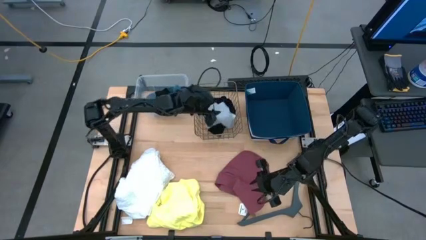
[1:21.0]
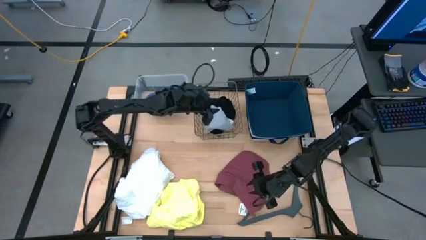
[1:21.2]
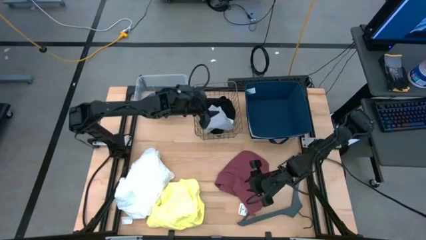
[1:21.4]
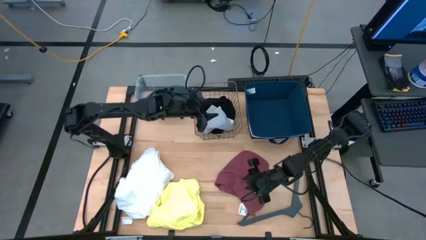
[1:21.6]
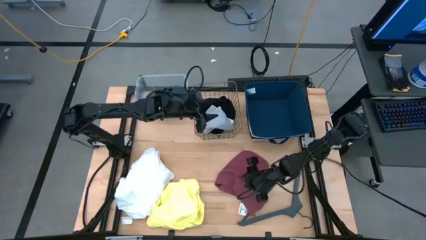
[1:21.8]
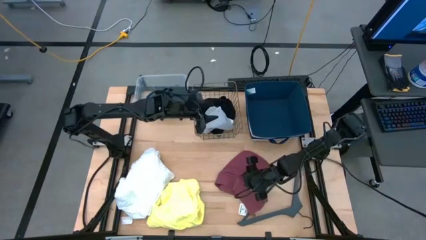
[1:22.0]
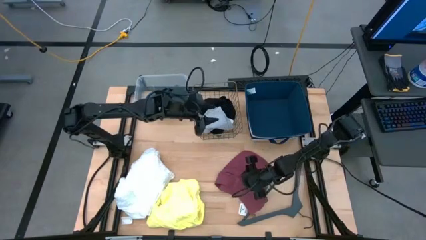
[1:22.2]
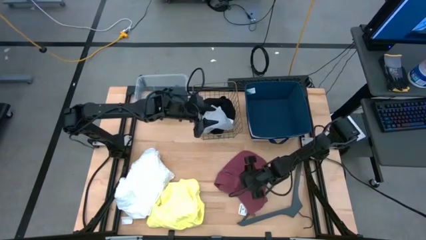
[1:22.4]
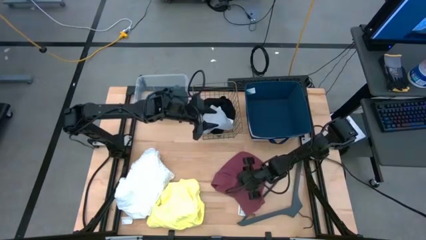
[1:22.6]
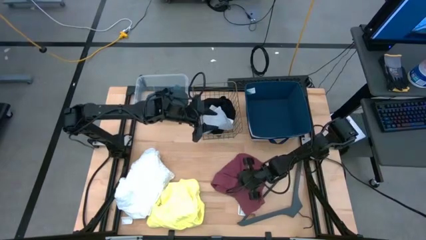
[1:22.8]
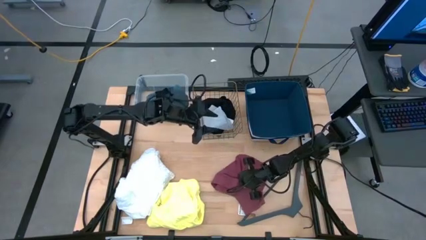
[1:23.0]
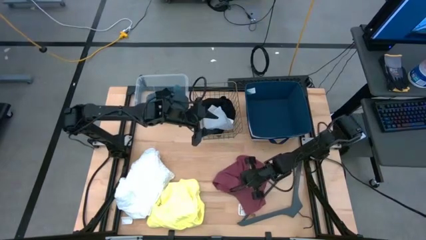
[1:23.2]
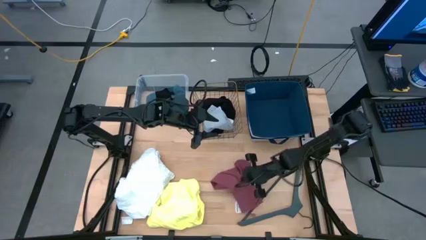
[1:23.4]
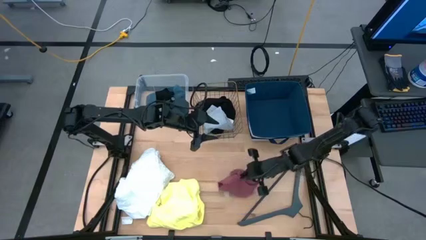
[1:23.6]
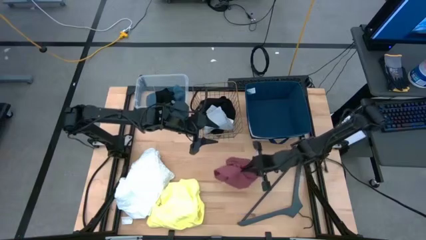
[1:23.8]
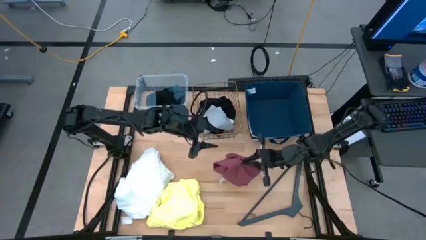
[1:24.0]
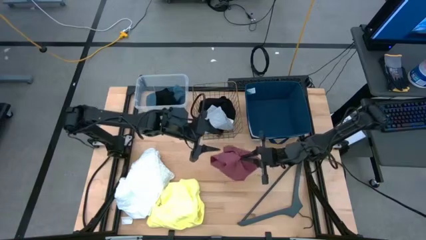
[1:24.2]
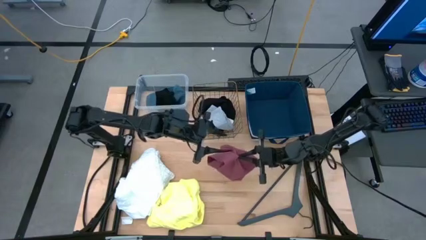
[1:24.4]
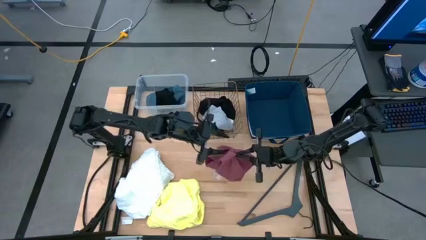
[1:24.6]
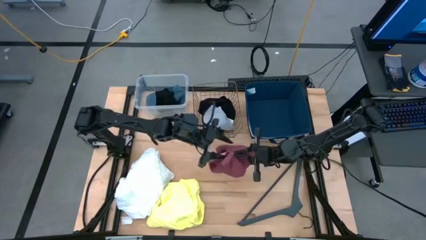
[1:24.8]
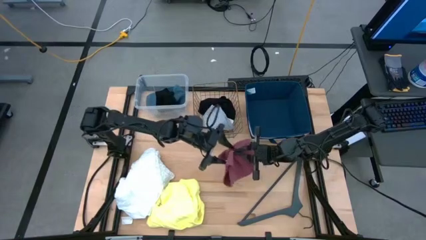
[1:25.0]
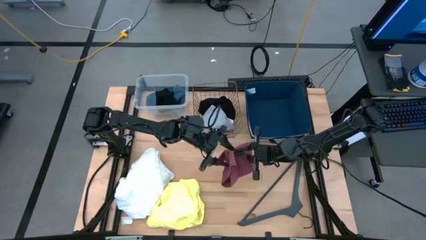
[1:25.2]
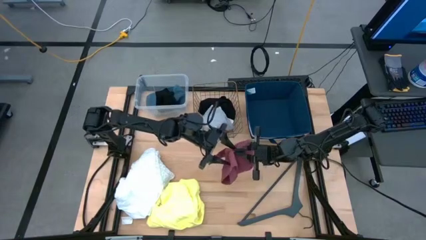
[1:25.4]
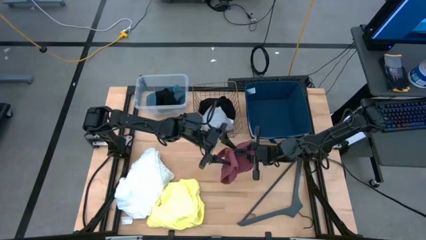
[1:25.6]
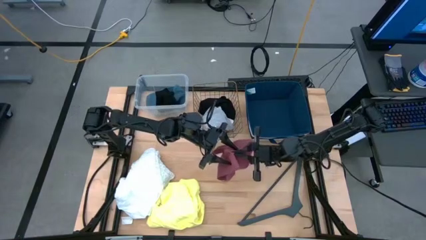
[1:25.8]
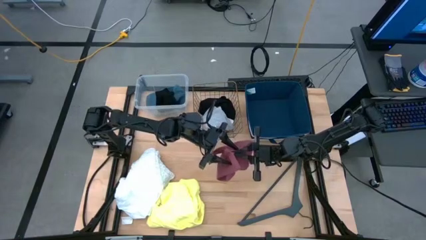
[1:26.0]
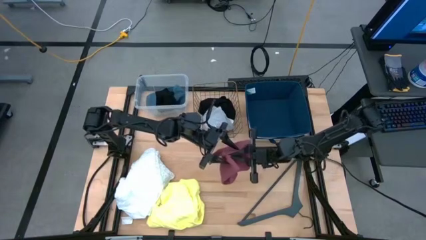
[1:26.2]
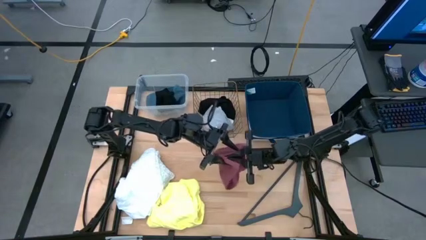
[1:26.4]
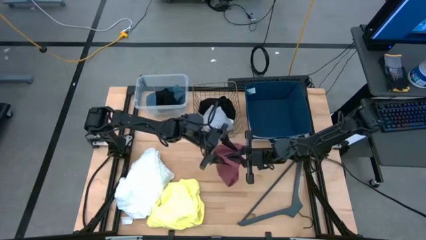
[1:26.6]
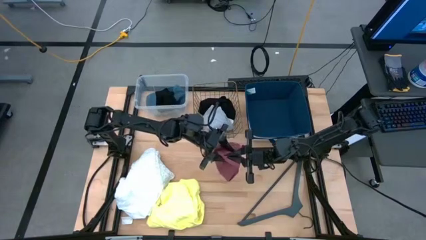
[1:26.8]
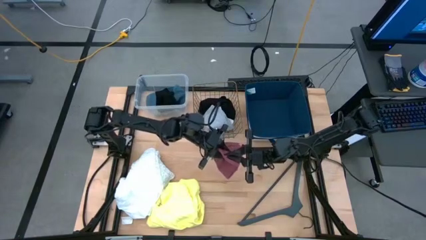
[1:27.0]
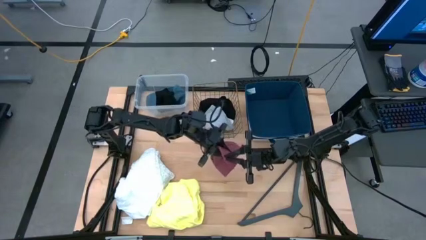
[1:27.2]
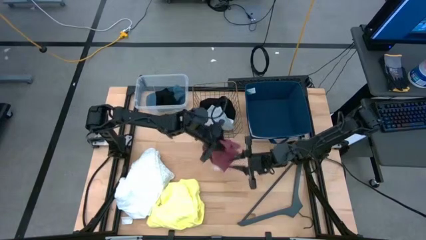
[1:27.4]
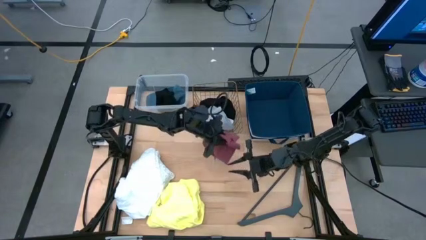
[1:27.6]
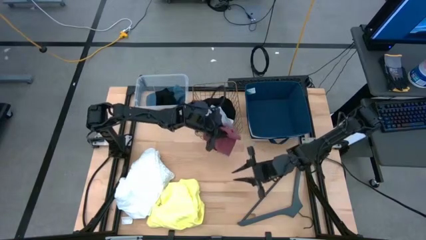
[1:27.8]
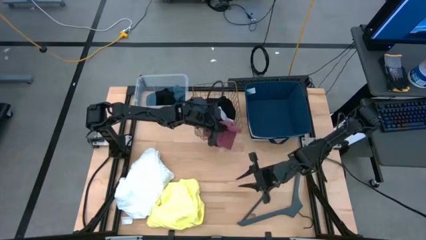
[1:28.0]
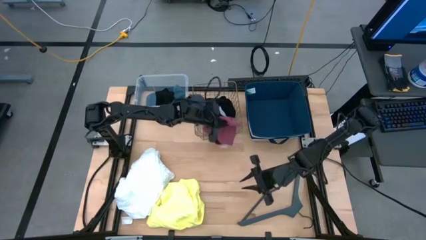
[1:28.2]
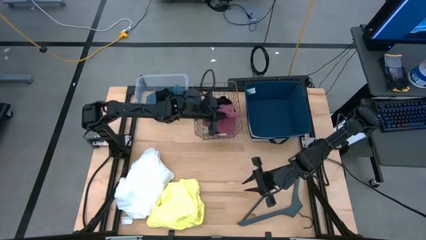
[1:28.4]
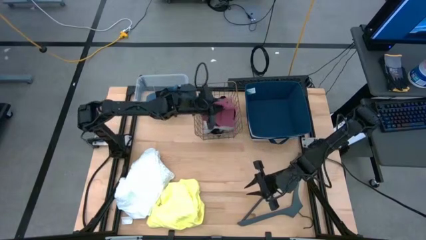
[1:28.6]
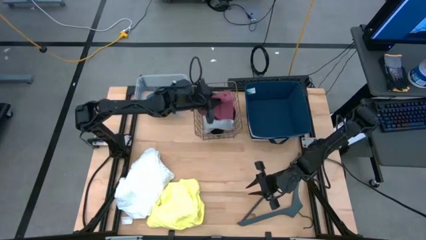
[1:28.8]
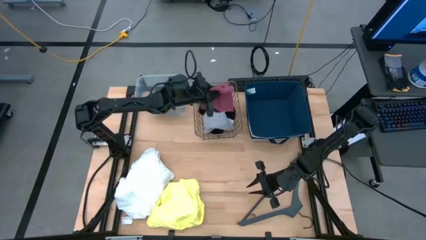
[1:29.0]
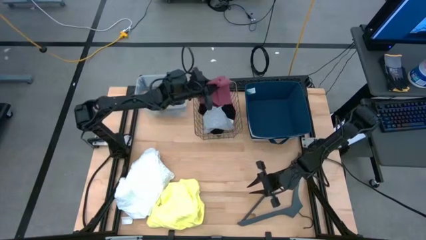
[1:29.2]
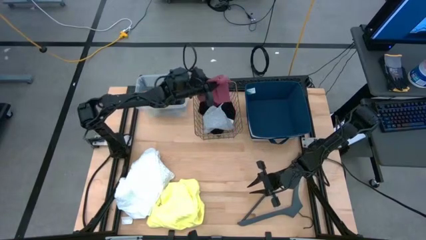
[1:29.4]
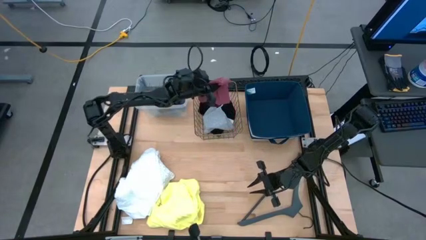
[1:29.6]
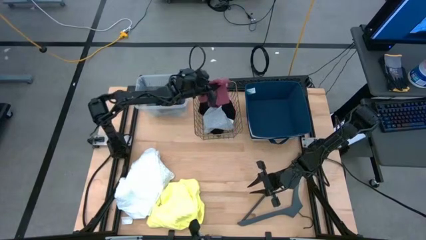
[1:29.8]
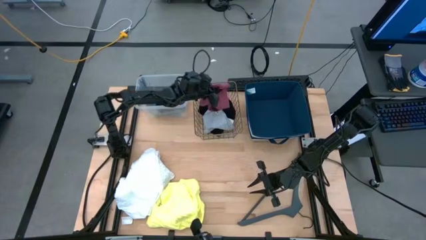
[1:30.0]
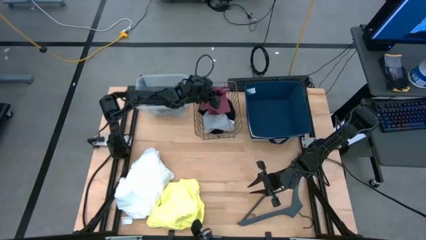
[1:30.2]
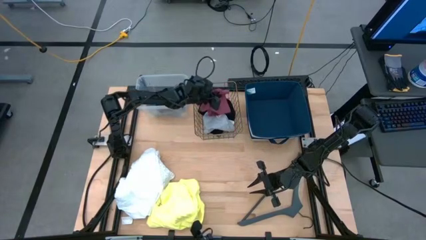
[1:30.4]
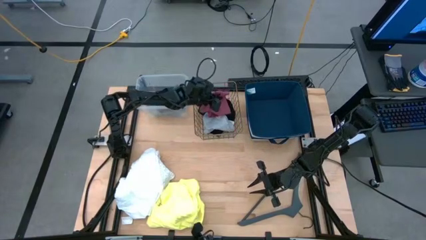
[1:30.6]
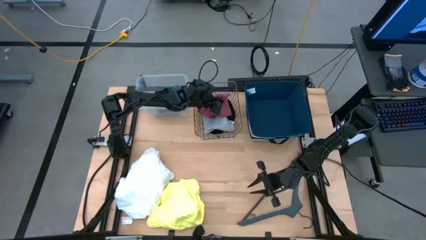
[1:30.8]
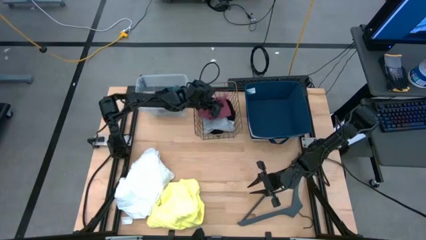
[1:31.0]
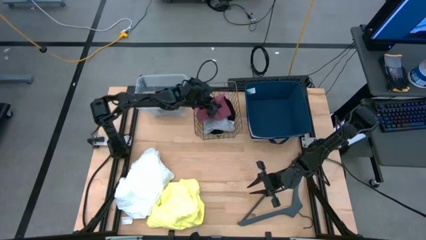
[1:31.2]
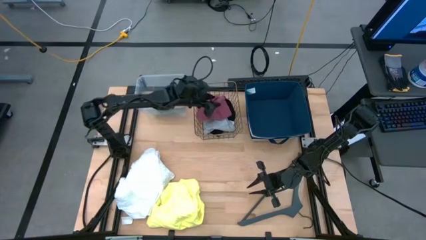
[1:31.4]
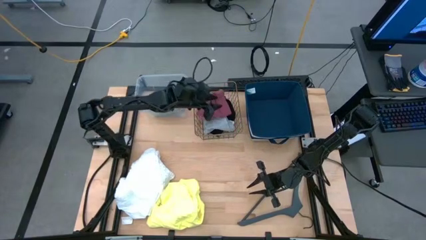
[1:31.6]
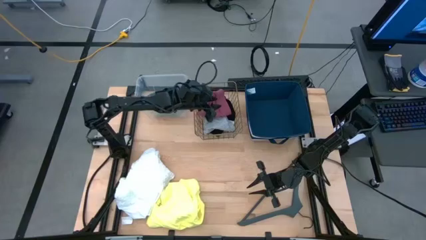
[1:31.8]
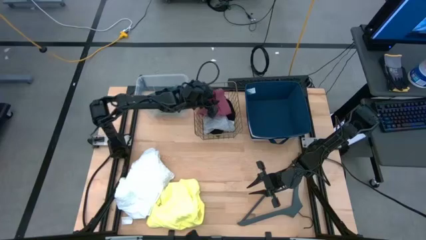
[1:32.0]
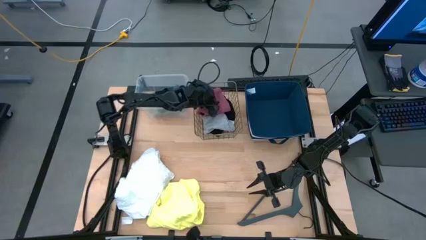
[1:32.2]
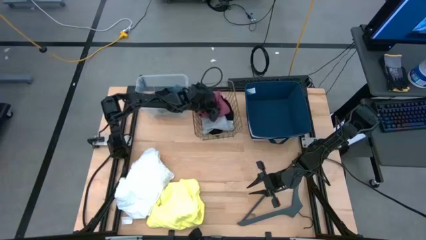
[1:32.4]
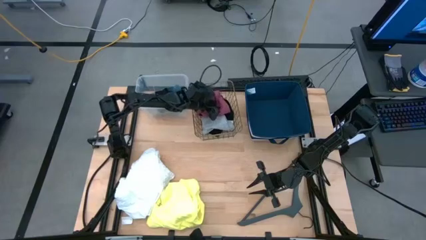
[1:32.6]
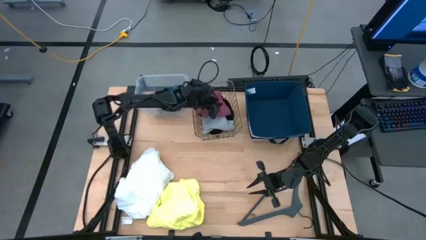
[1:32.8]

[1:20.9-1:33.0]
Task: Pick & Place Cloths
Put the red short into the gold wire basket

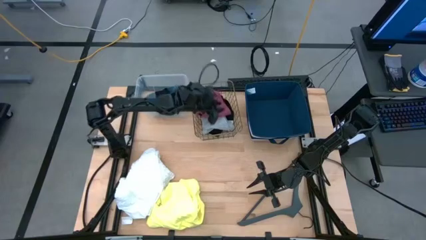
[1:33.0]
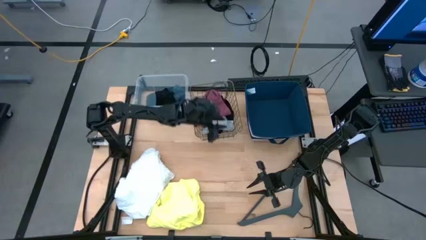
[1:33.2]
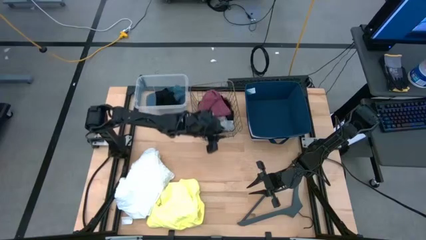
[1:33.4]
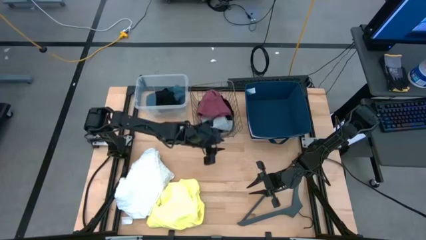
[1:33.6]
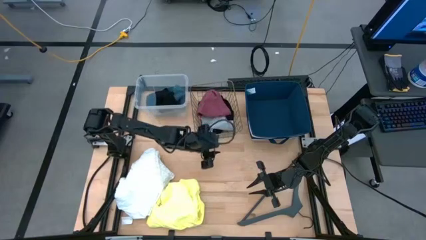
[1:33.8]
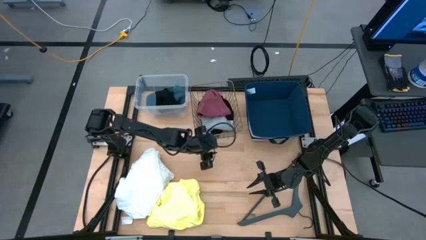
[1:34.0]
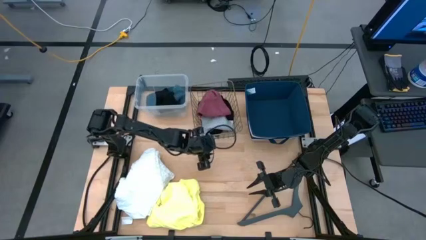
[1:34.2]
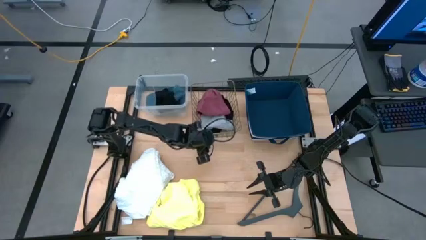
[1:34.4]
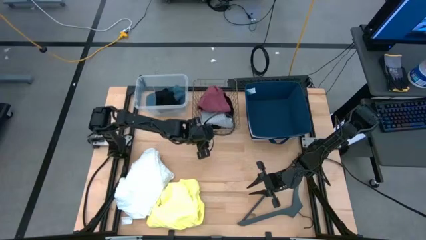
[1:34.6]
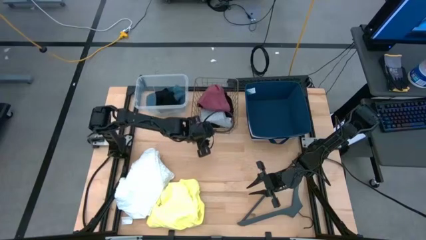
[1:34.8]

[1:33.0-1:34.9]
Adjust the gold wire basket

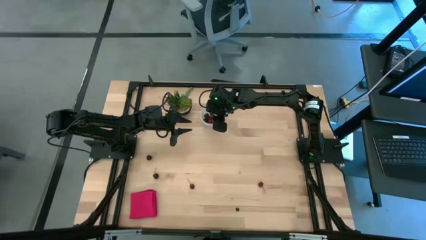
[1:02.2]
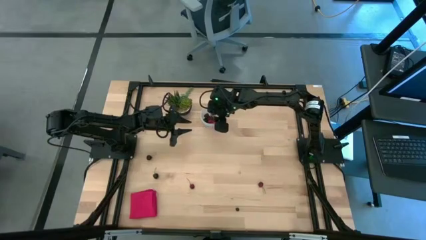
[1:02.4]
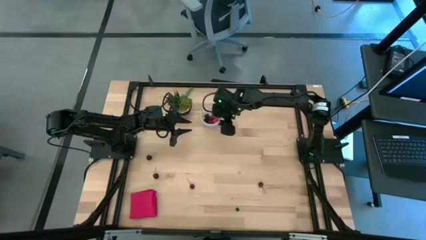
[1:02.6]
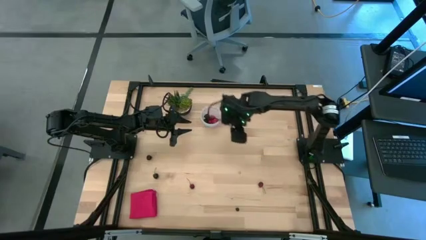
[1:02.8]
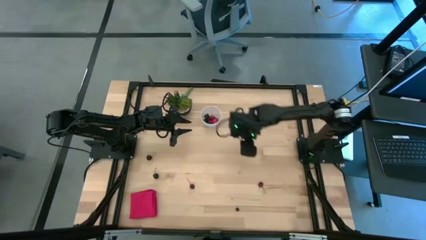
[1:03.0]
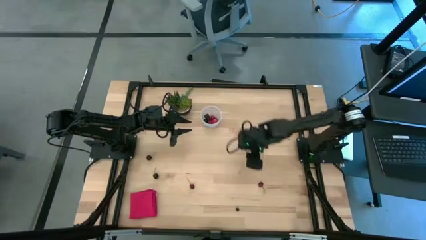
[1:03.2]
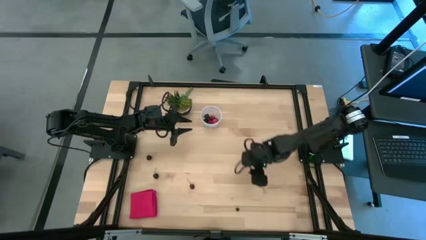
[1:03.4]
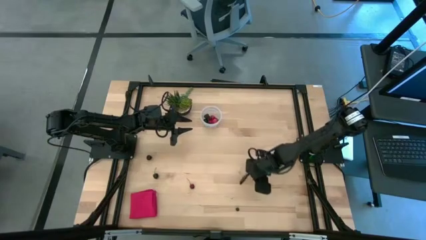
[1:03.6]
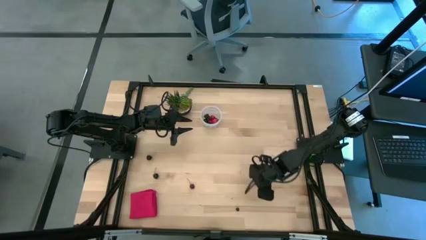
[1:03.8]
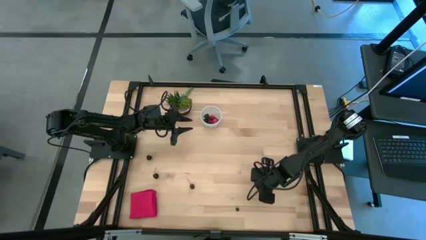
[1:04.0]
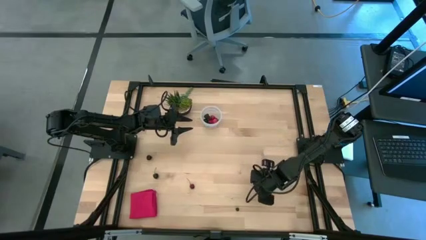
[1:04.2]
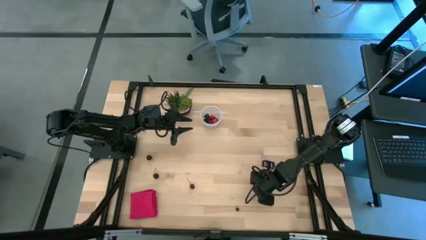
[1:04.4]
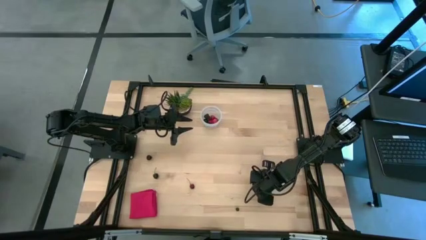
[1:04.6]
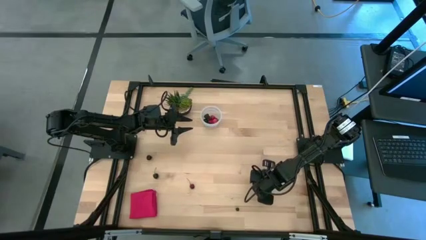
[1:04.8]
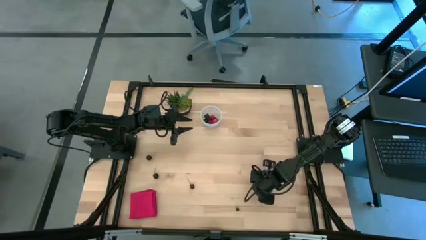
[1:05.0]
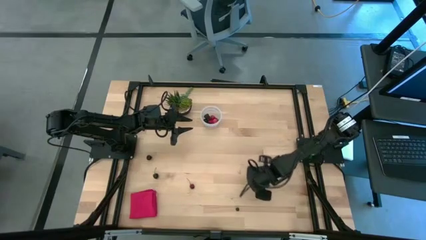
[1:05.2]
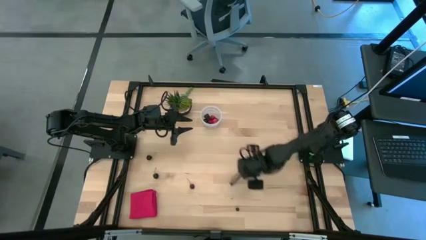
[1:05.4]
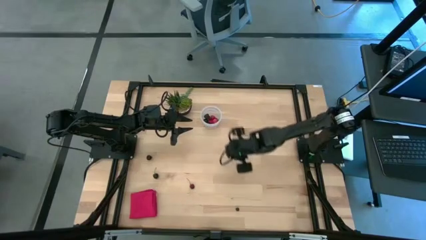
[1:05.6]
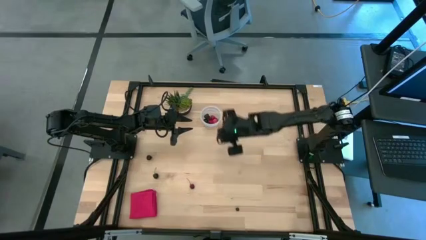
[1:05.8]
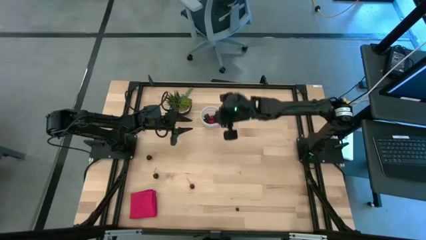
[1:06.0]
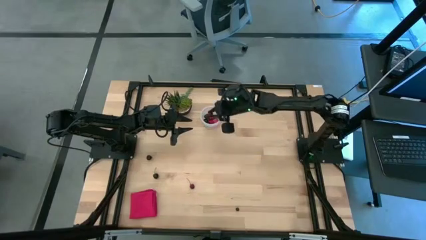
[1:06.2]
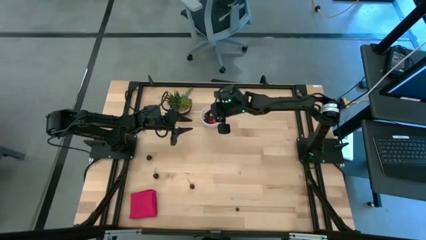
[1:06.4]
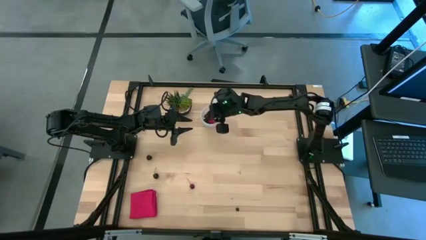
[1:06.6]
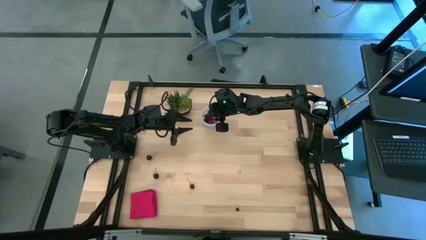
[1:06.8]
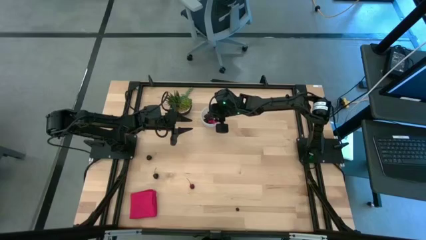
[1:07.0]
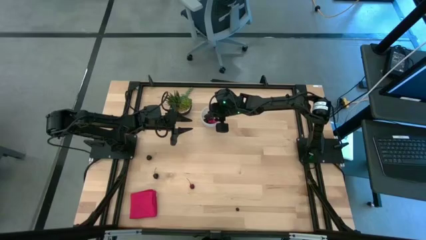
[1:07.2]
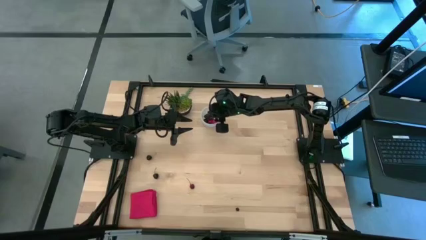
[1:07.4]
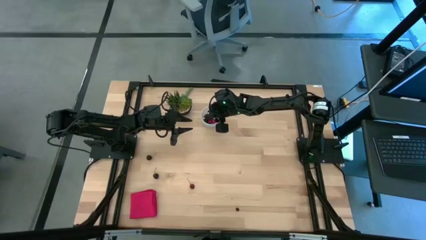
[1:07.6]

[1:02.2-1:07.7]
Task: Pick and placing Produce into tupperware
Put the red cherry into the transparent container
